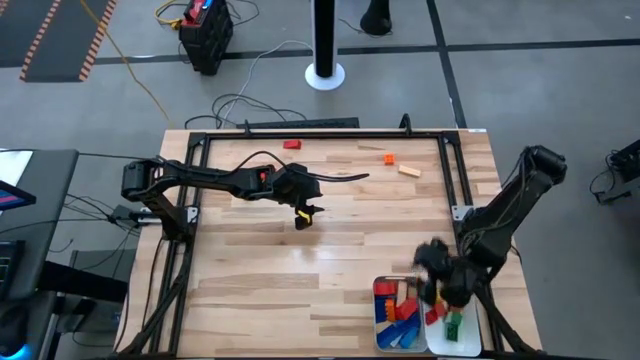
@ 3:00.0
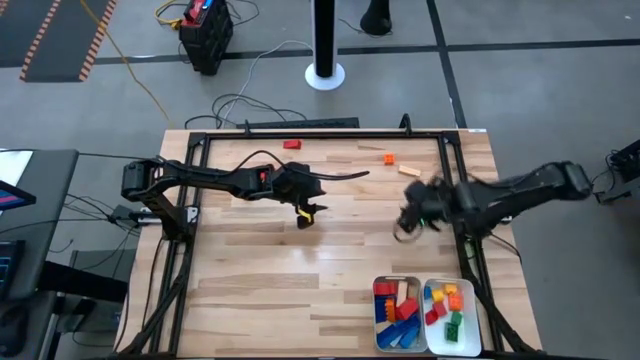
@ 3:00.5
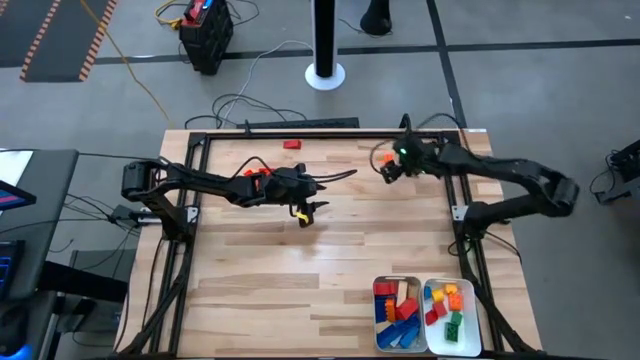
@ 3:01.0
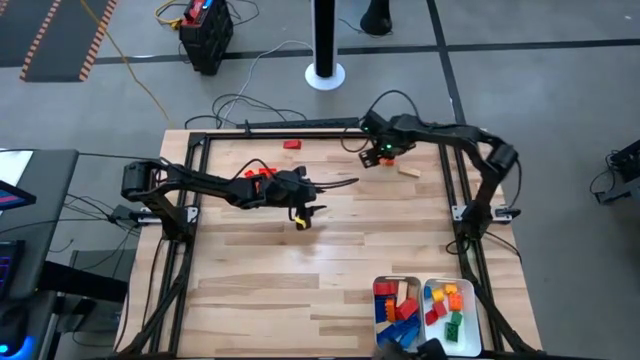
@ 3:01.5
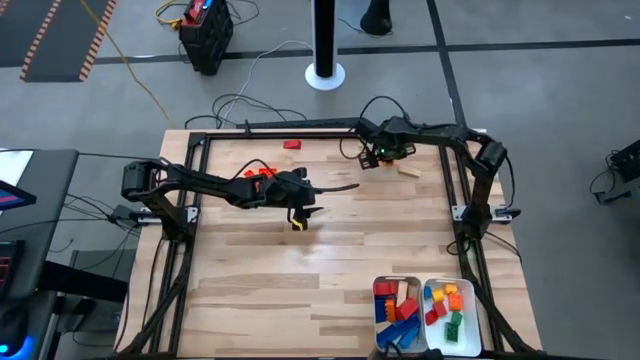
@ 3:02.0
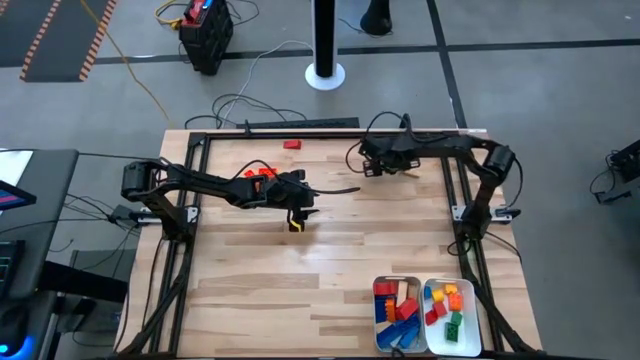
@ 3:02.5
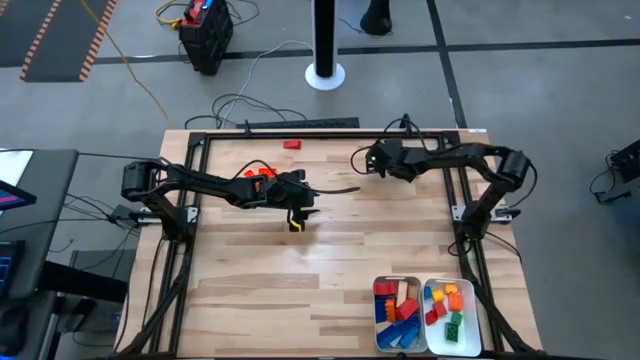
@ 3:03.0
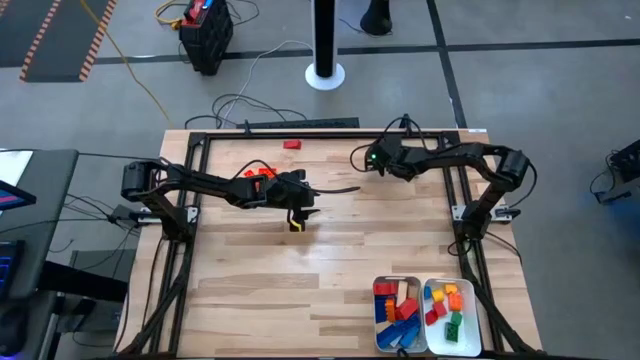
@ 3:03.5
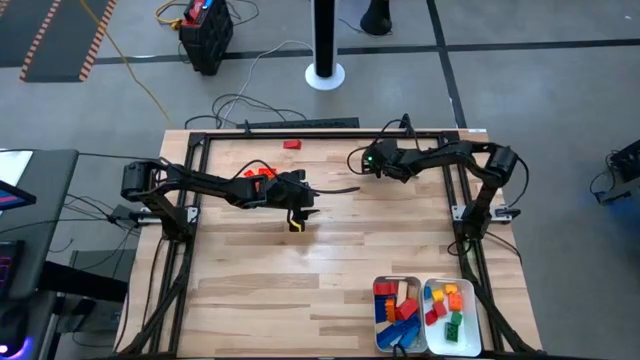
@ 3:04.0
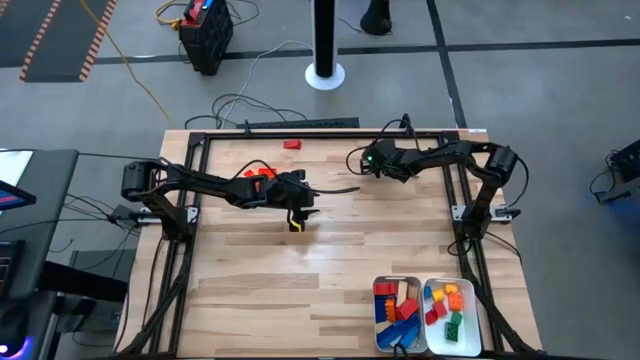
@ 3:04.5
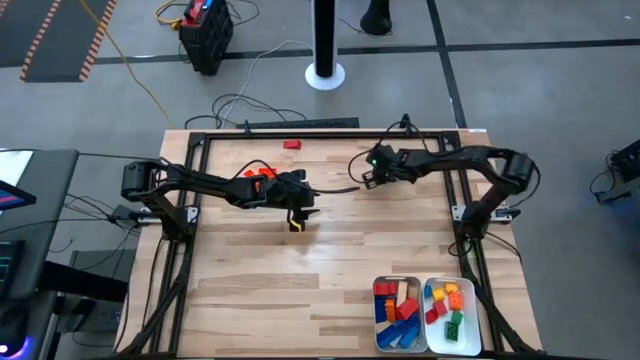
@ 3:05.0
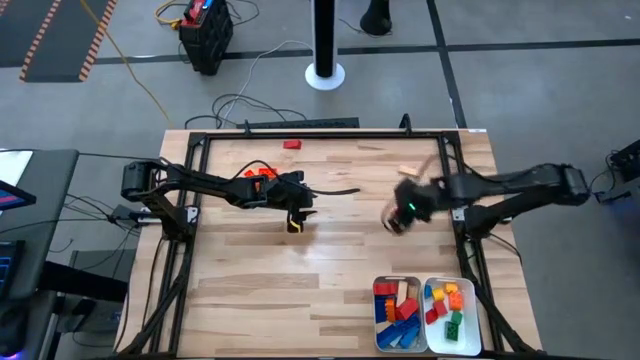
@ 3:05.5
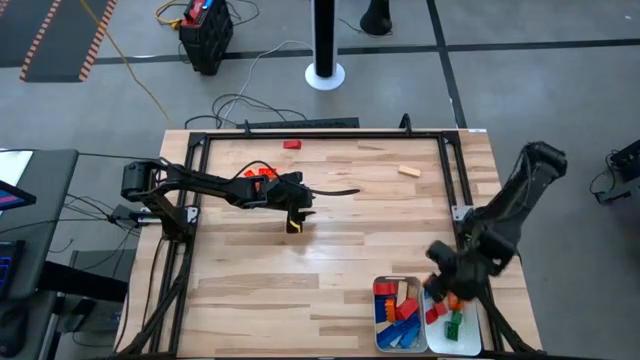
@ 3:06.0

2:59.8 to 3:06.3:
Task: Sort blocks by size
Put the small orange game piece into the white bin

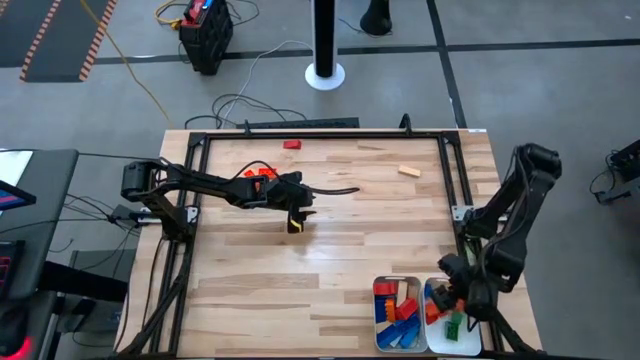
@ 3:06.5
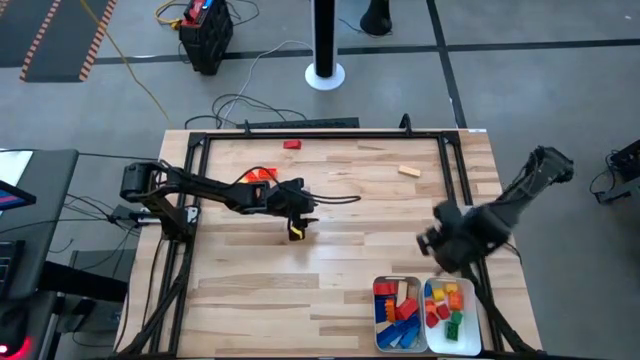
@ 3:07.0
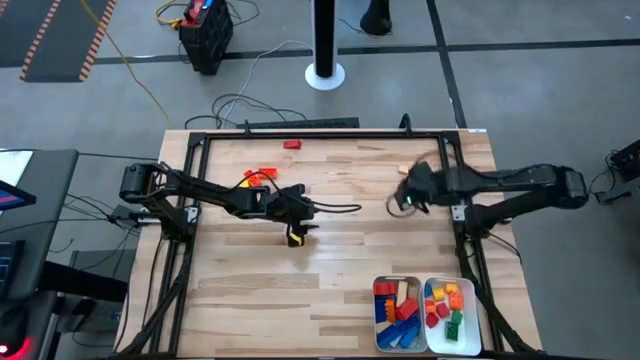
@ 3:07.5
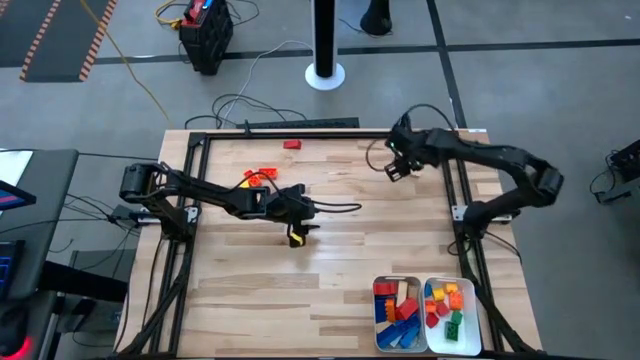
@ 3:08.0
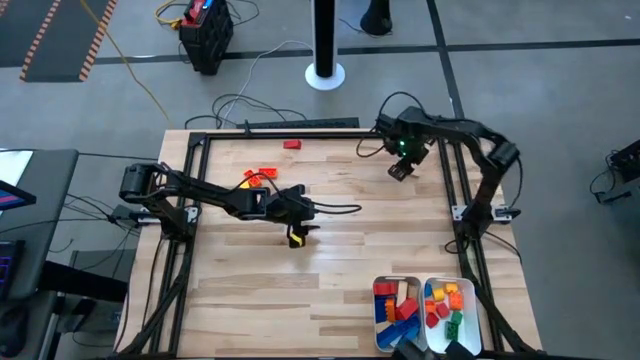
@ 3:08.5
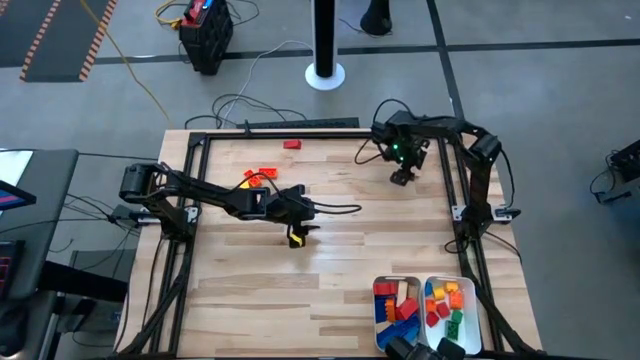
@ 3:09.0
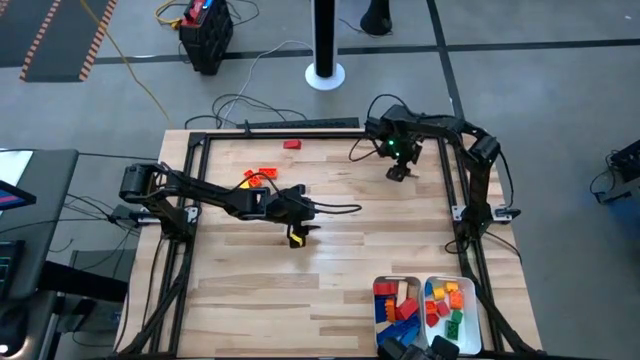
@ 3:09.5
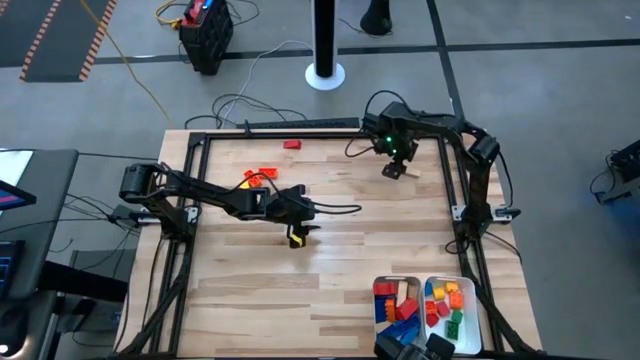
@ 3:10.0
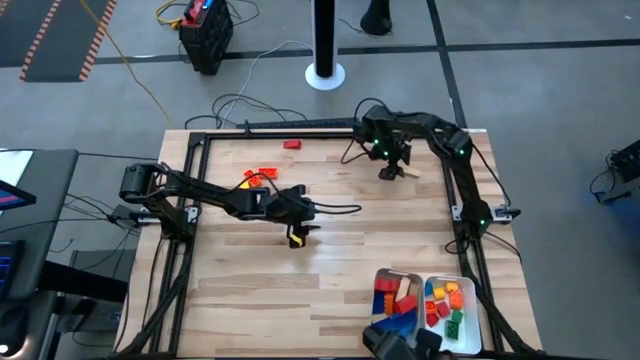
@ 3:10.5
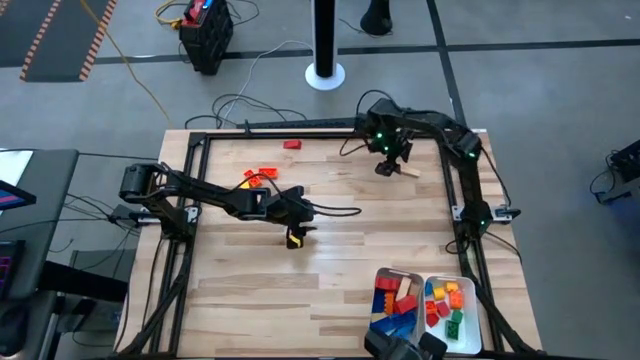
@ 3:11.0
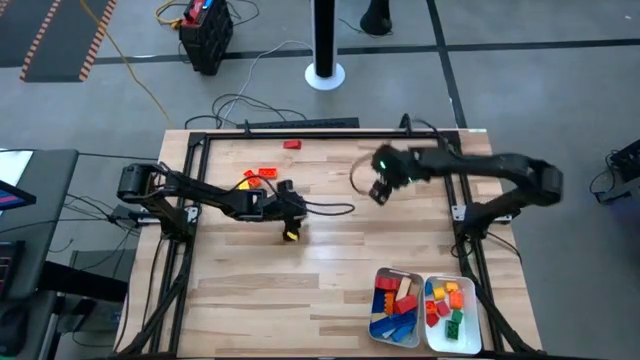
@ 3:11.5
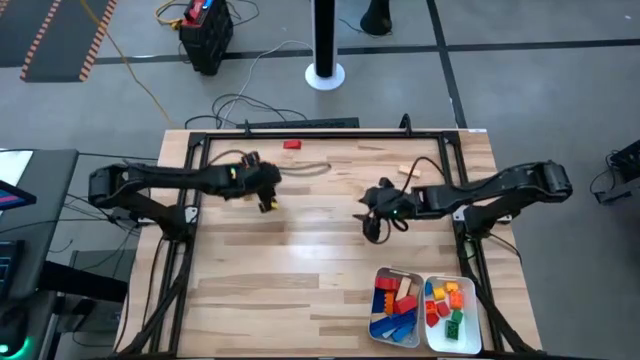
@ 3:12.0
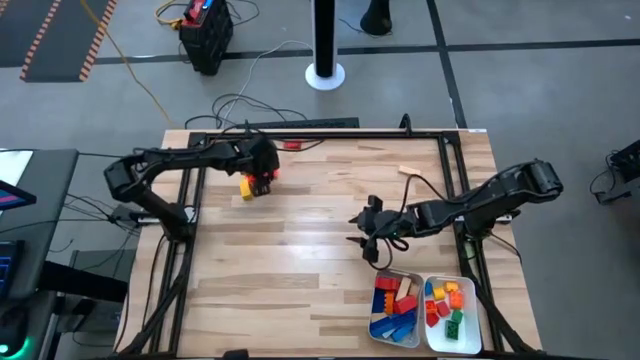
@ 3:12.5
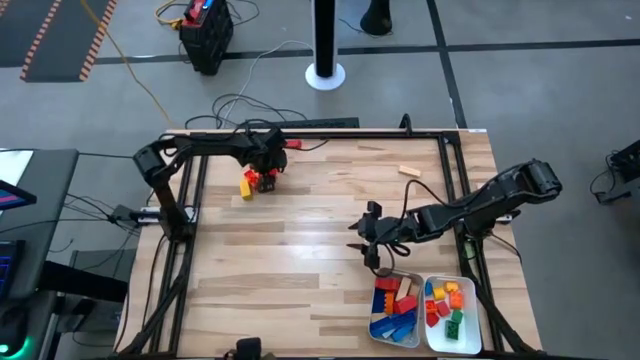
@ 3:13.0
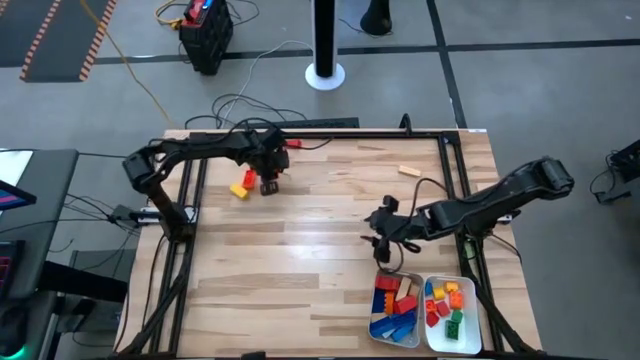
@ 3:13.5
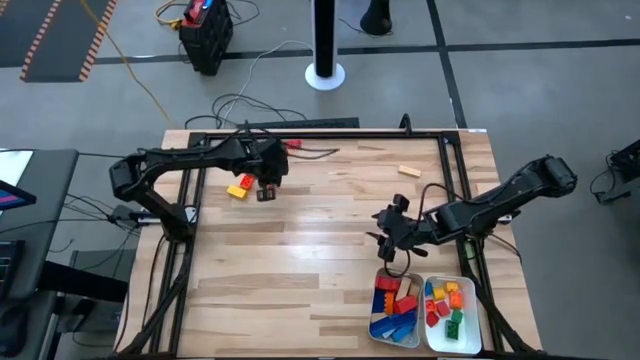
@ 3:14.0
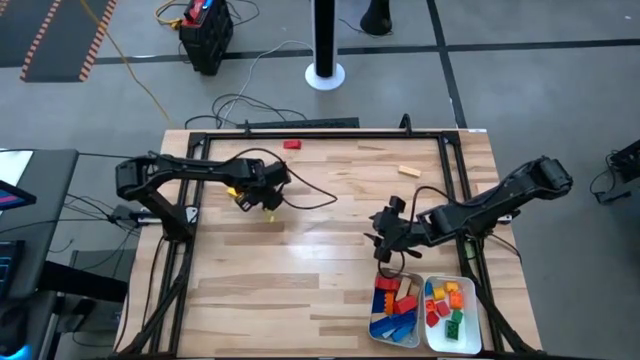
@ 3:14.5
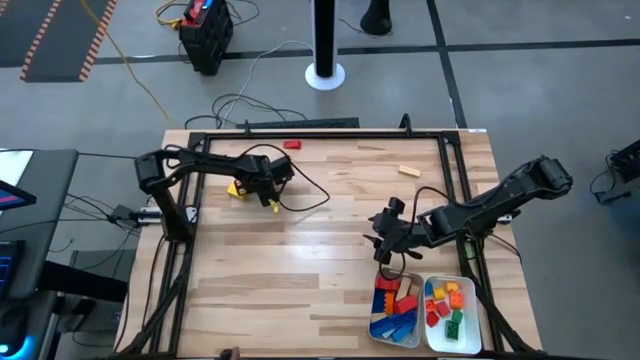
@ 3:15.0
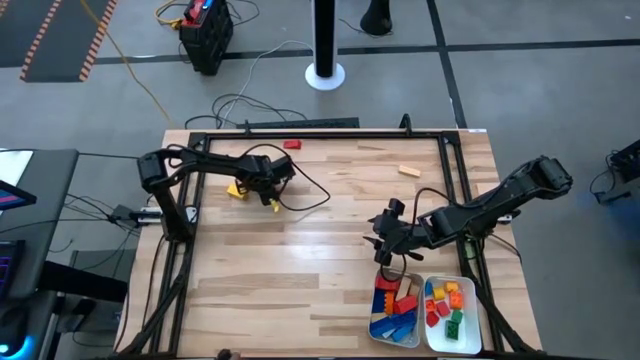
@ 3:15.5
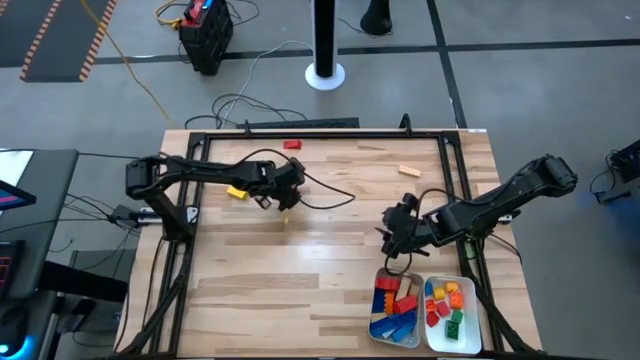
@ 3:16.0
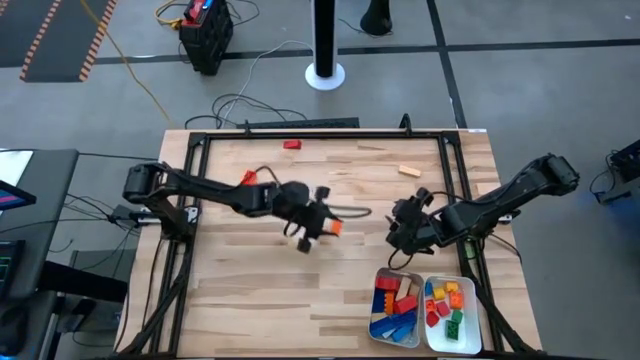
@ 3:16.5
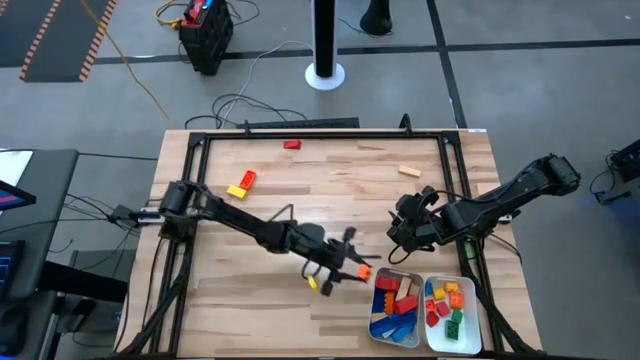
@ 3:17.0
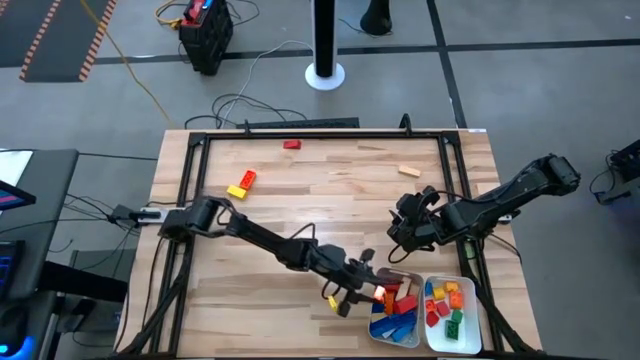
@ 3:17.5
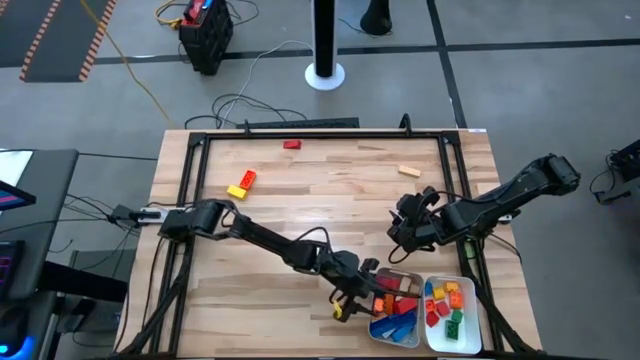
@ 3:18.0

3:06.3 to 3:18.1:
Put the large orange game piece into the gray bin

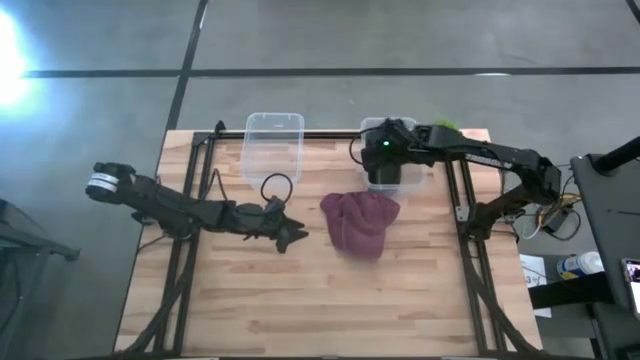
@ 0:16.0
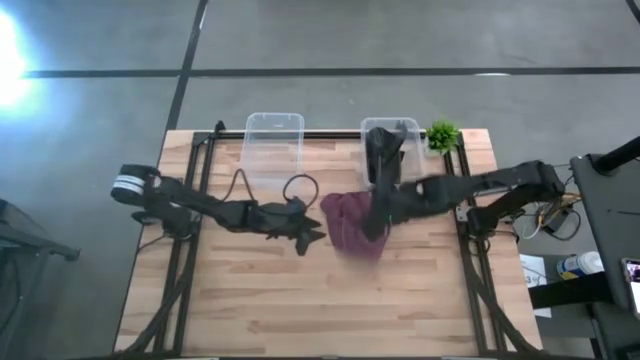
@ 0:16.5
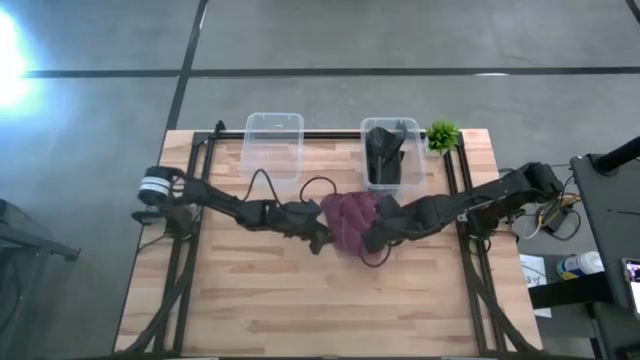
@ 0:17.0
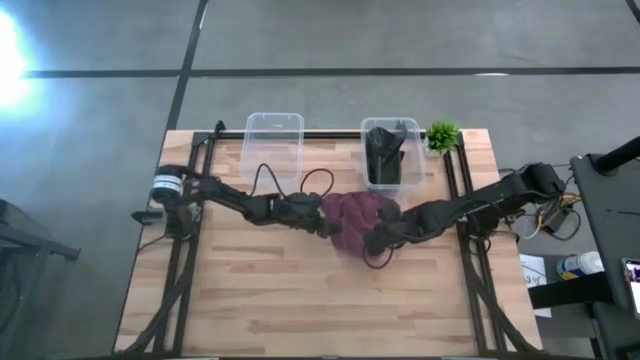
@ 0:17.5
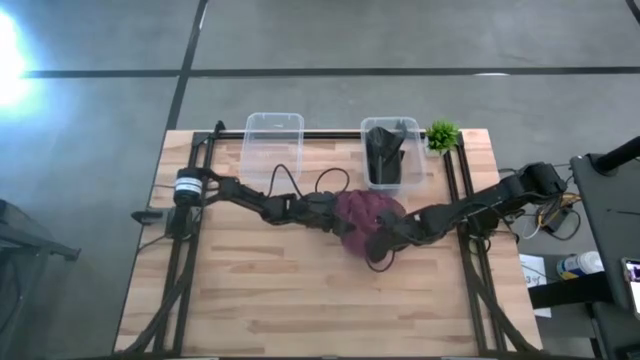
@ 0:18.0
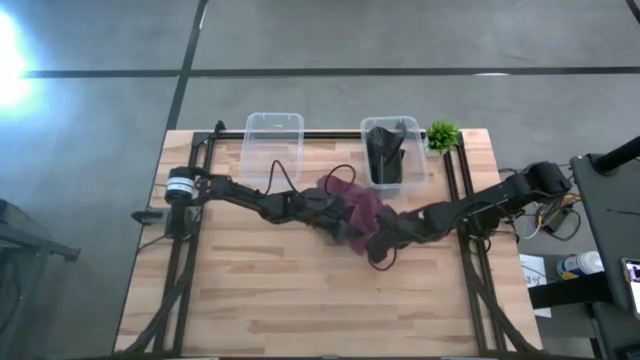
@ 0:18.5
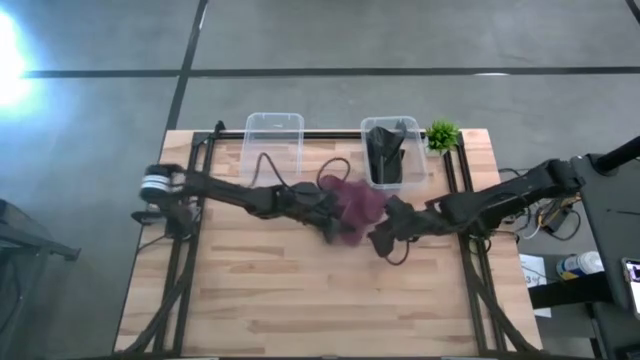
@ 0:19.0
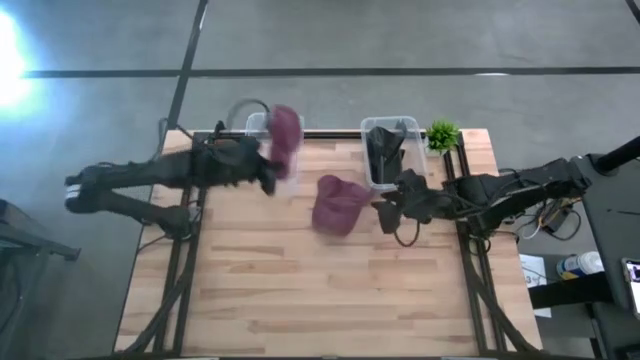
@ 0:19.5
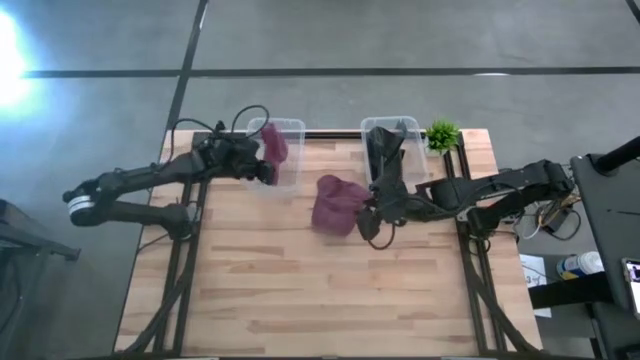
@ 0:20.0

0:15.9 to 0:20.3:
Task: Pick & Place hat
Put the right red cap into the left transparent bin
